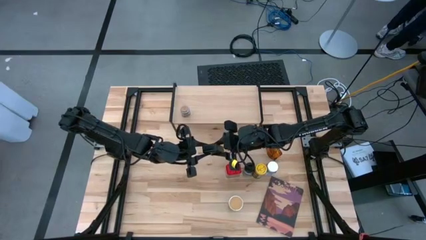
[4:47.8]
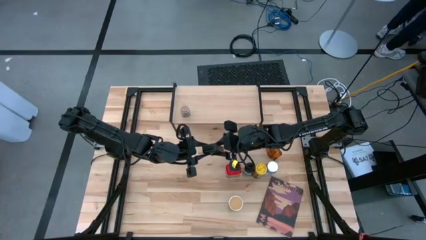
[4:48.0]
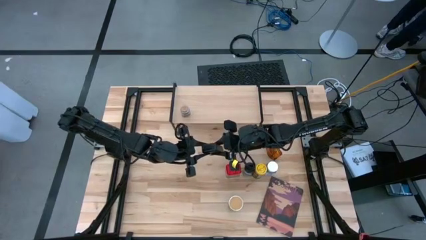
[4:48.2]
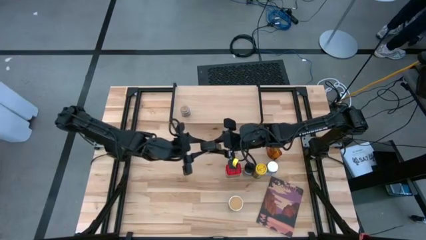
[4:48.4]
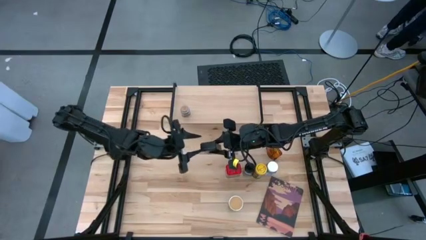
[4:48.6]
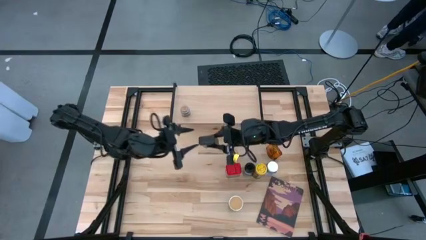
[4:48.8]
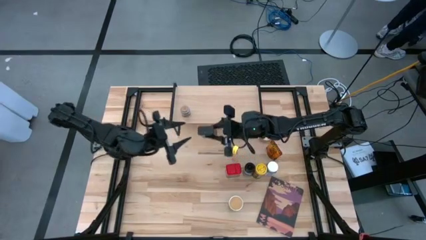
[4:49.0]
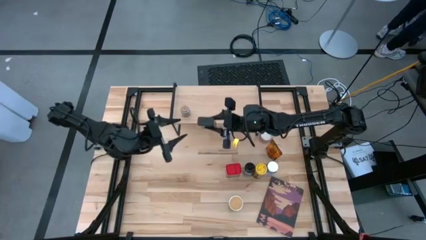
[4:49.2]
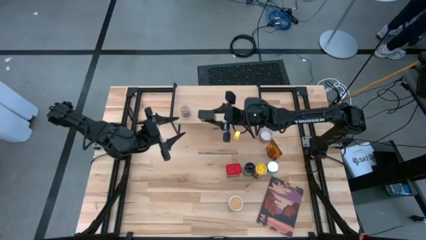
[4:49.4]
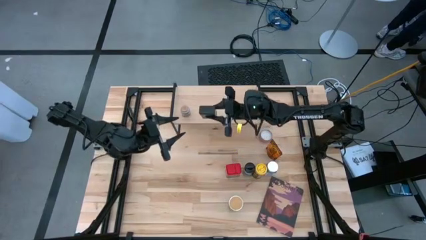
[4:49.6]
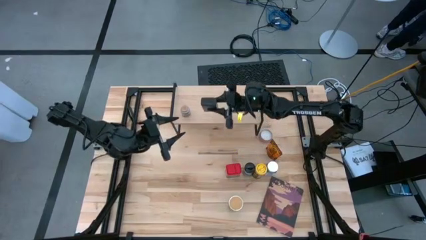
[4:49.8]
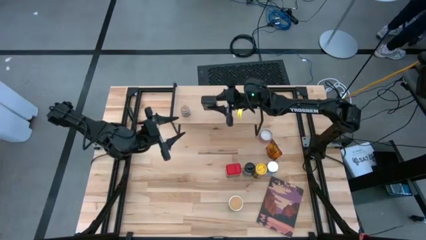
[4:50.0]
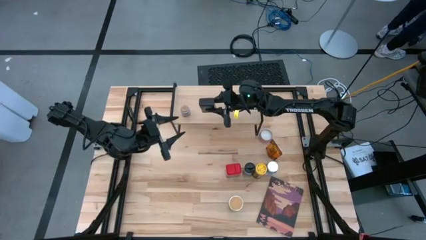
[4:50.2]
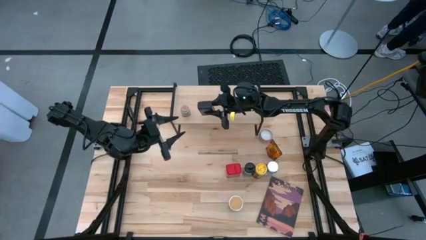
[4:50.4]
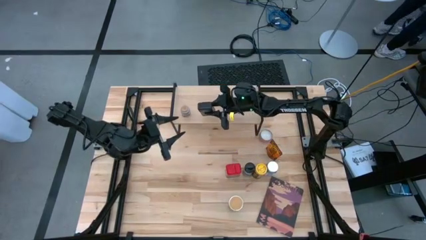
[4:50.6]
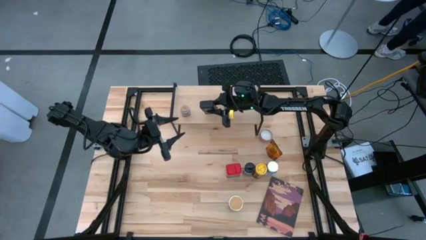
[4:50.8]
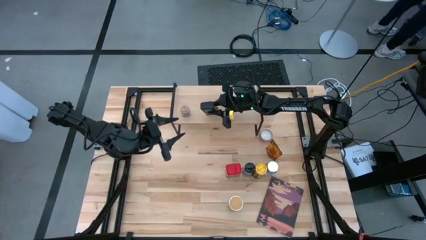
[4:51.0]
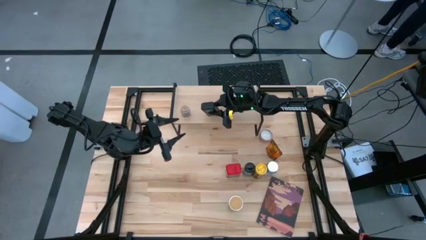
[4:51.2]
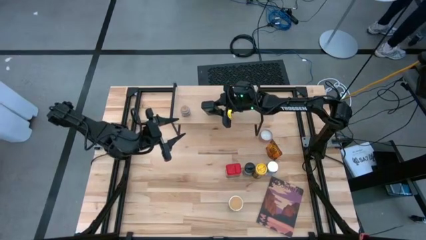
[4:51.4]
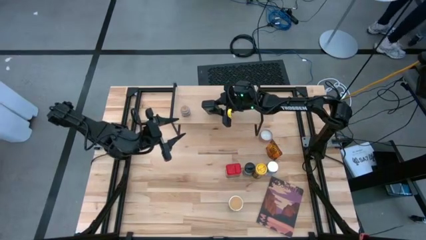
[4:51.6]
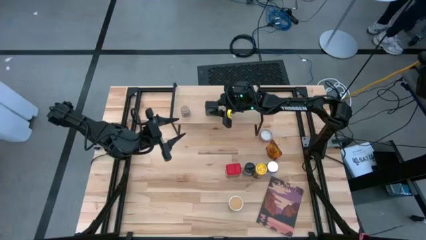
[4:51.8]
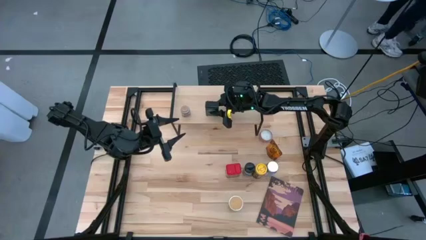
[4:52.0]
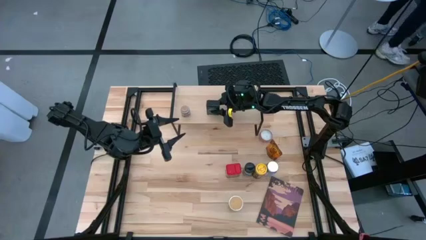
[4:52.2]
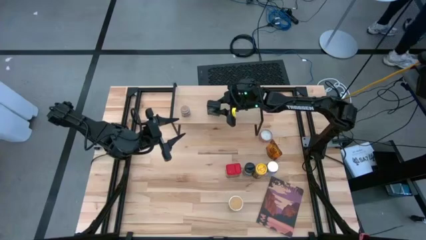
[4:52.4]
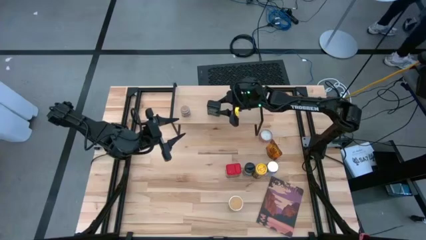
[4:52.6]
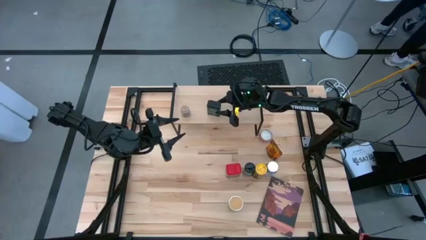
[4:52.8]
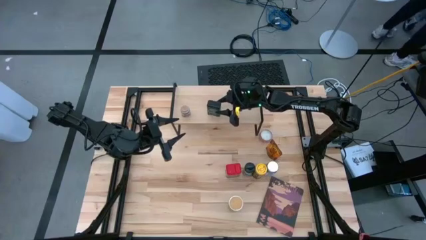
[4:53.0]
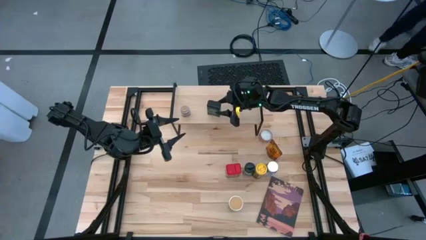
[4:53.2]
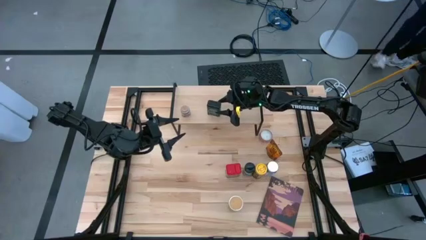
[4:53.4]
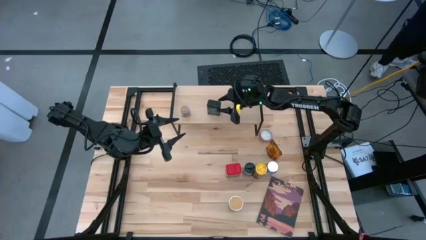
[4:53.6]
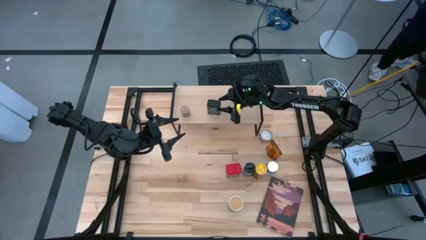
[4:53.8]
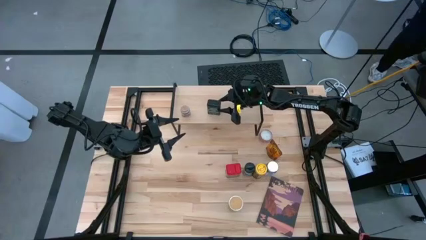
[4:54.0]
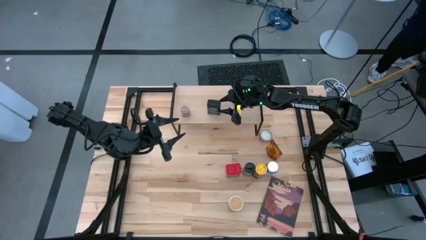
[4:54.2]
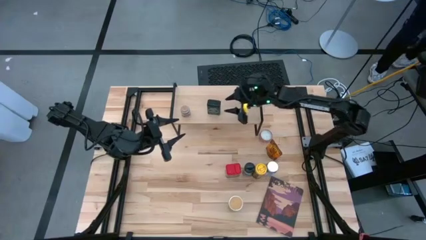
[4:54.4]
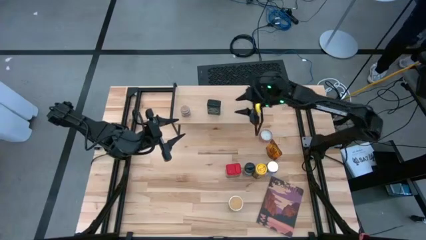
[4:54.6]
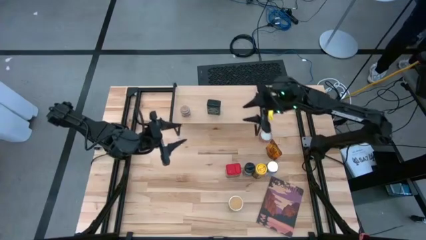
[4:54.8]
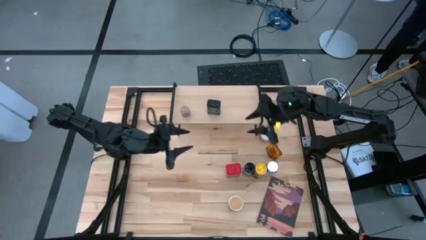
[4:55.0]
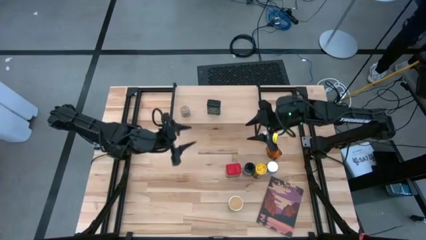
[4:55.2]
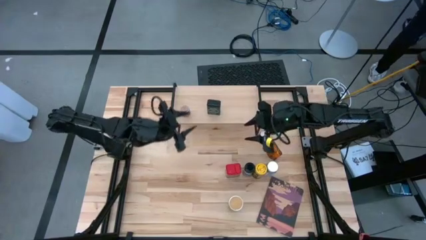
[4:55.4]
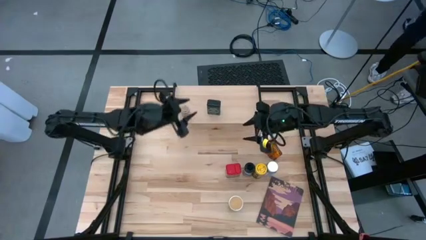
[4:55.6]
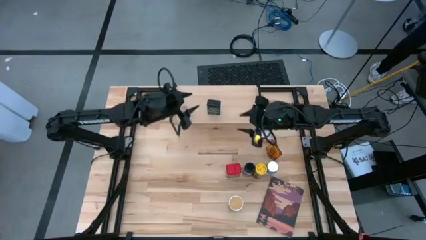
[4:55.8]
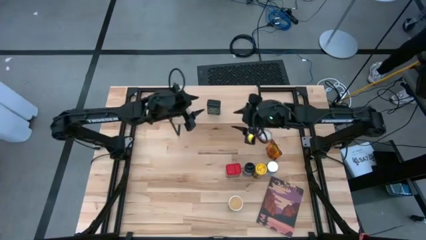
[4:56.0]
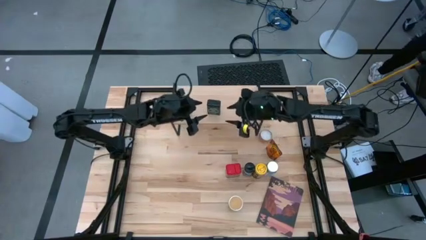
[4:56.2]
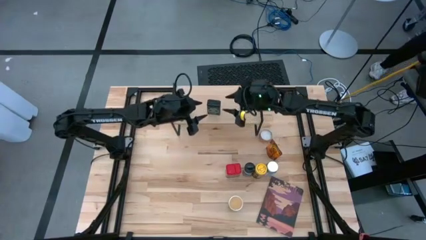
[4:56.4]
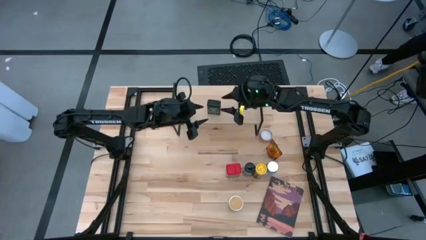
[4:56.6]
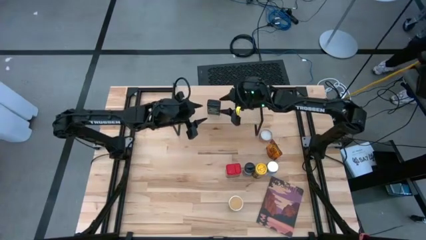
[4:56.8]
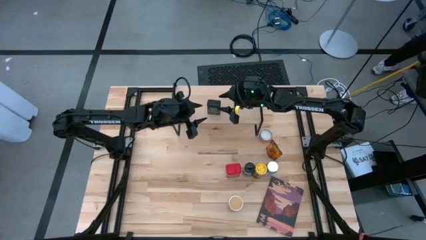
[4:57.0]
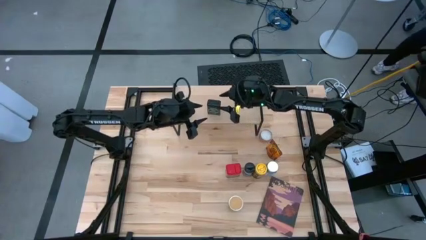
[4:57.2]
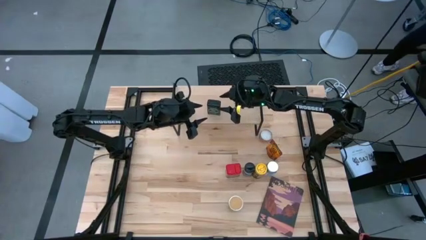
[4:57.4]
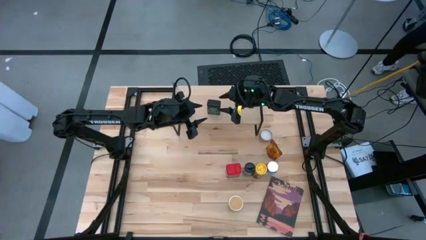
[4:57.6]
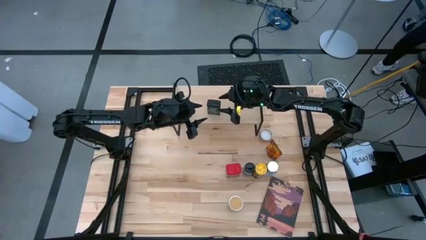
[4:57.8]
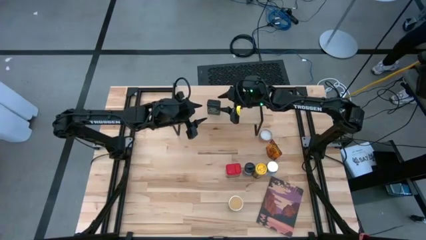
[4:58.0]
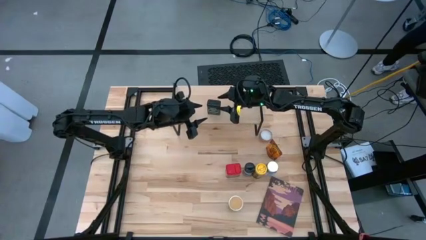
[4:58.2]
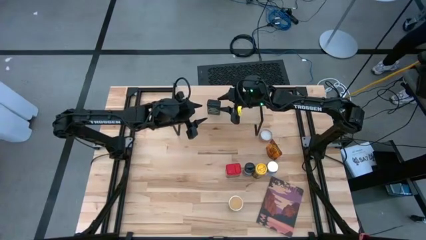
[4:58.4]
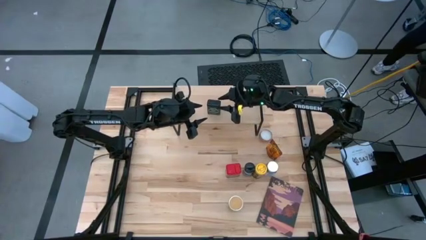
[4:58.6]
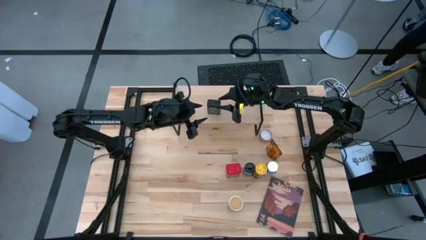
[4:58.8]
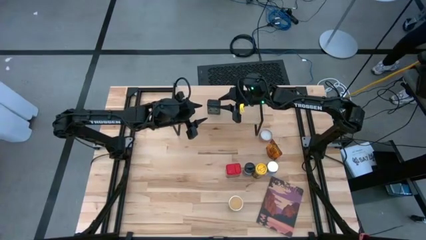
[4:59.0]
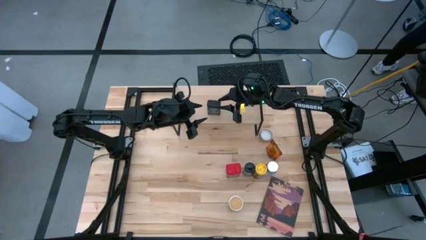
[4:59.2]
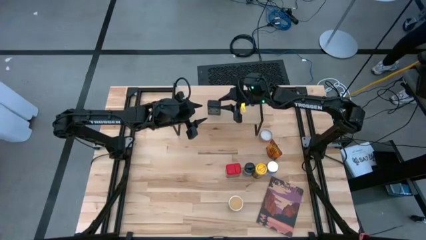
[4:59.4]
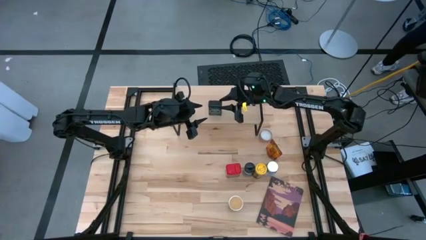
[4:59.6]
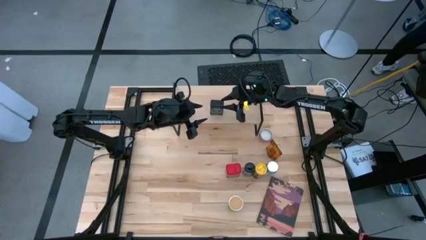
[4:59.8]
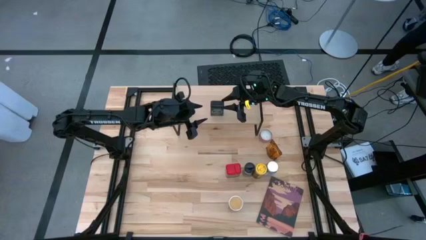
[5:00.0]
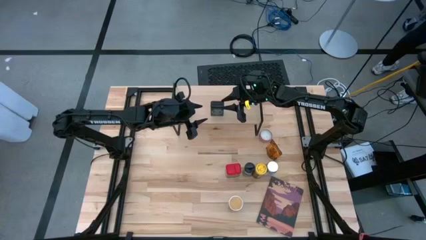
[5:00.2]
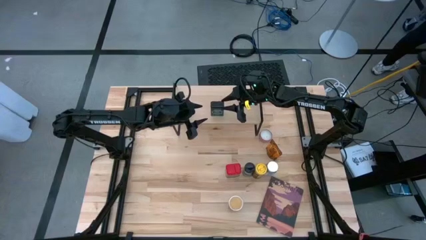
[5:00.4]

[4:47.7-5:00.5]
Task: Shelf spices
Put a green packet of spices on the shelf

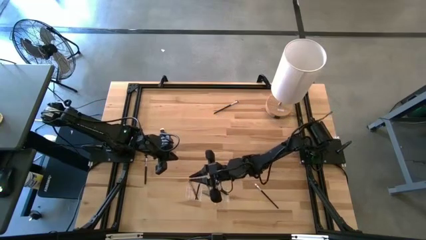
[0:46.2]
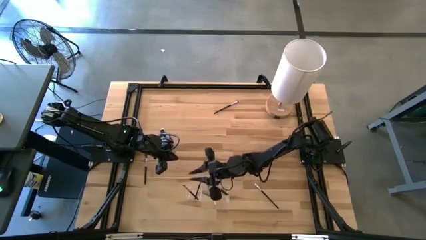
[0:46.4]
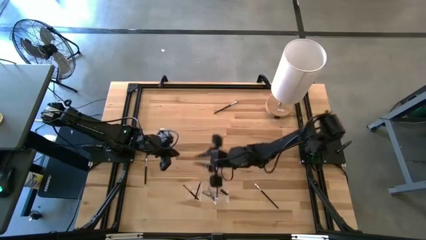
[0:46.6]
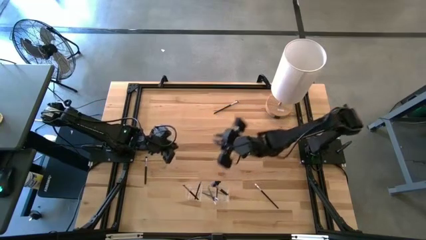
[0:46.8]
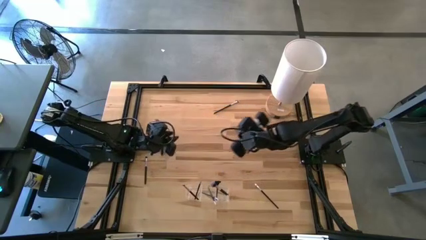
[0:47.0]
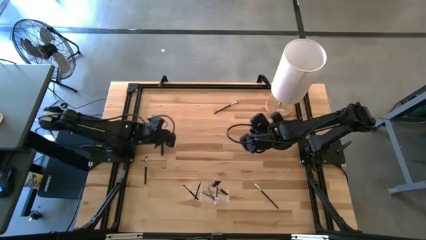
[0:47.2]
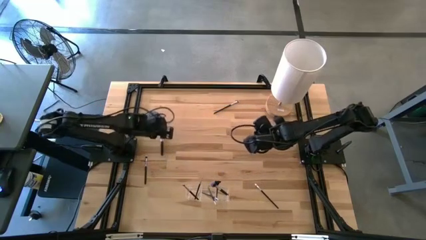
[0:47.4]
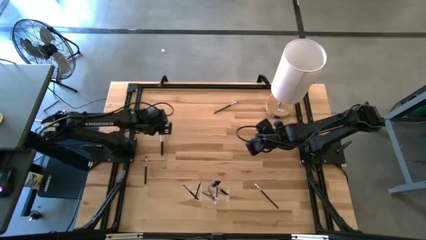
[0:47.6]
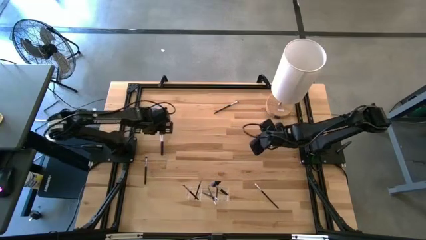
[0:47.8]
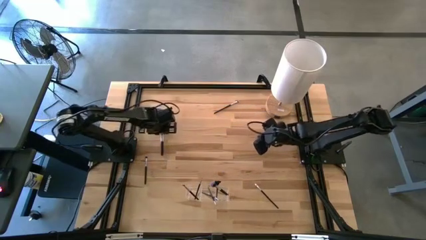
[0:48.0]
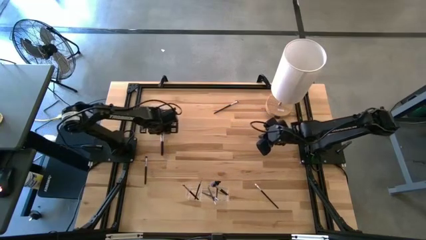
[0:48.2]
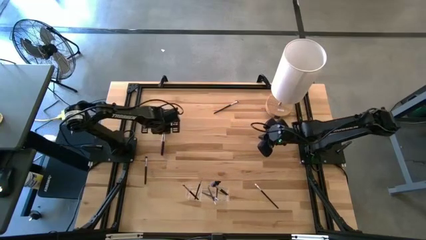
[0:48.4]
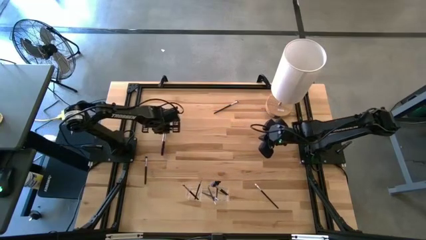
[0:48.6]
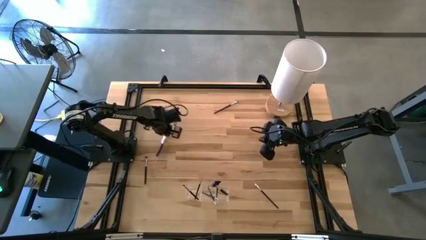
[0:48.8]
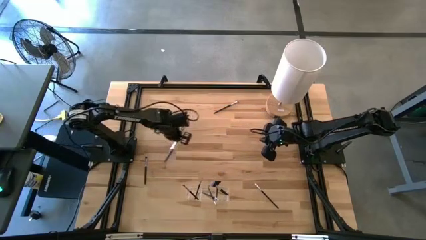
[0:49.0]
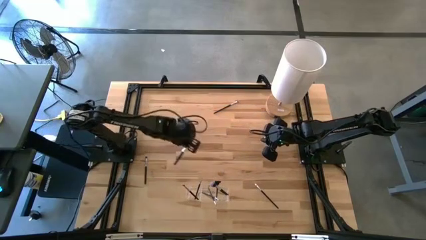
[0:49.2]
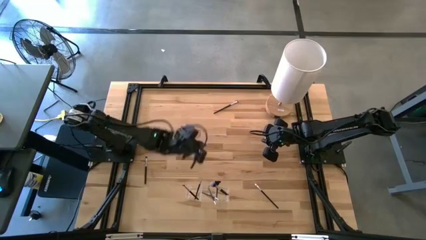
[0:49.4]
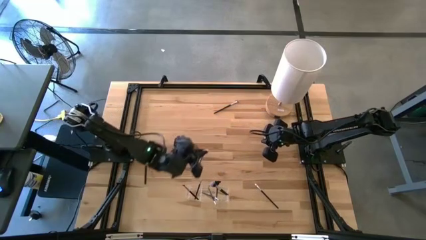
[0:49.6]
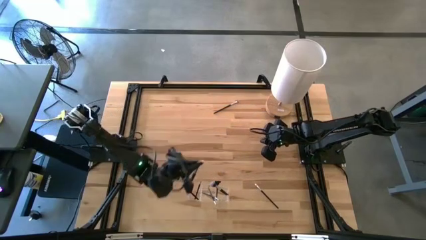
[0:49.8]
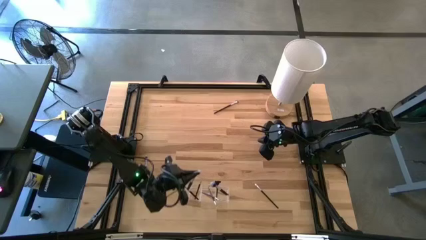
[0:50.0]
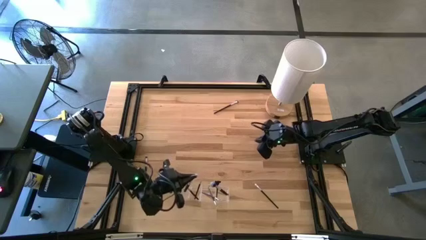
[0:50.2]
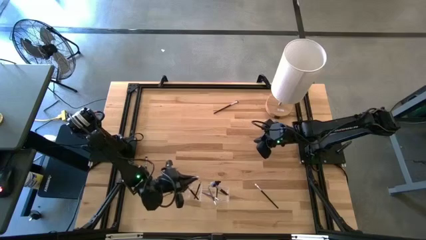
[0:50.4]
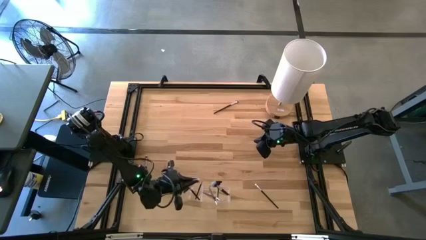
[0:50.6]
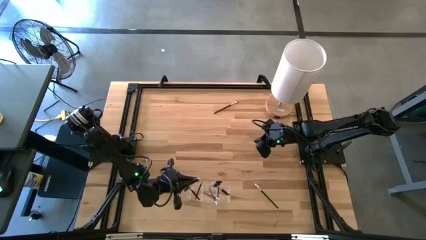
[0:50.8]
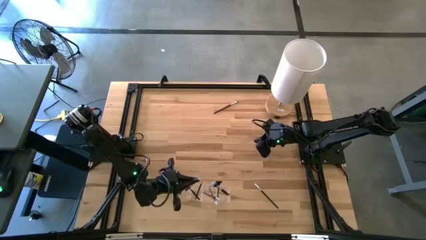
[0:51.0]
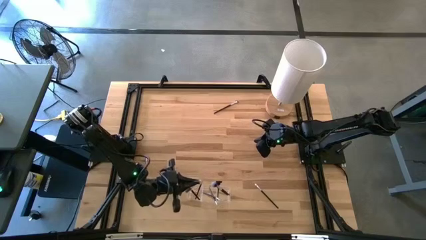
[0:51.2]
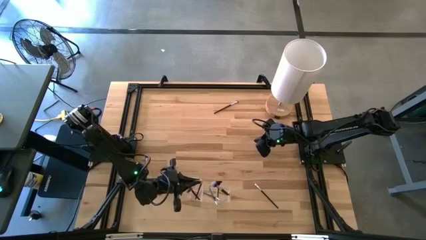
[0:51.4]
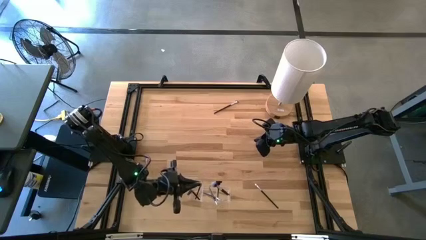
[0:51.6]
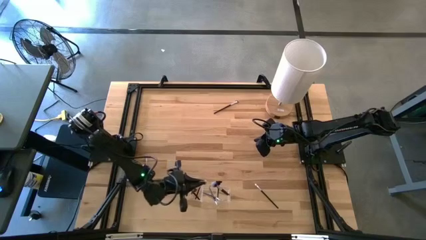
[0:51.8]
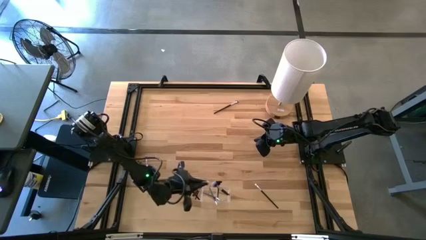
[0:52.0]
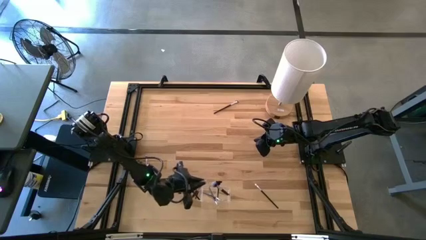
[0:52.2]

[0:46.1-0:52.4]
Task: Put items in baskets/containers
Put the black powder brush into the transparent organizer
